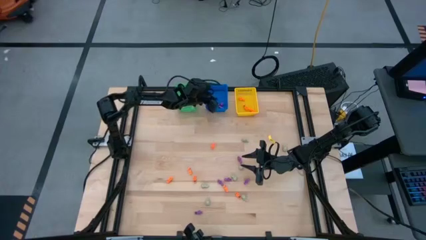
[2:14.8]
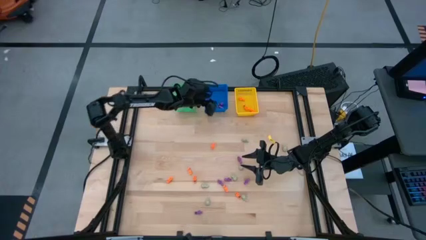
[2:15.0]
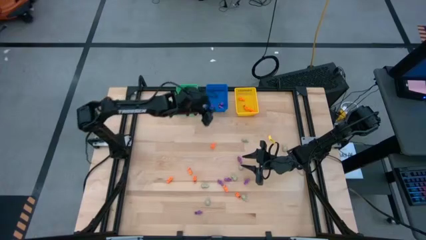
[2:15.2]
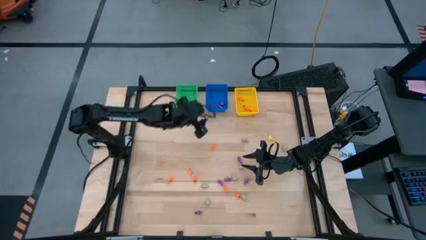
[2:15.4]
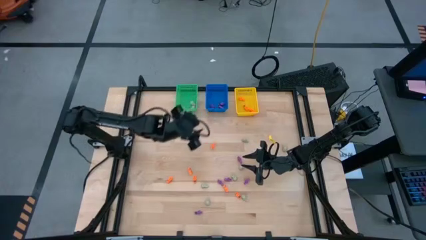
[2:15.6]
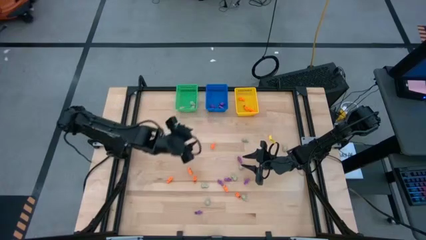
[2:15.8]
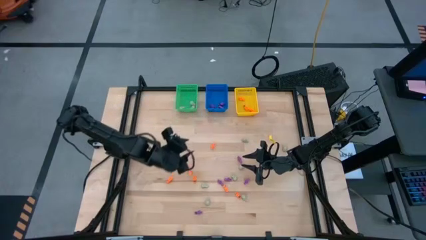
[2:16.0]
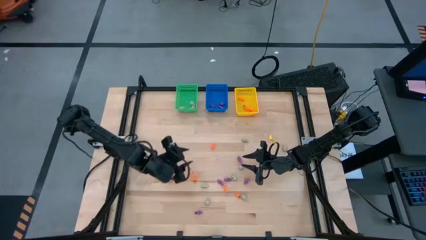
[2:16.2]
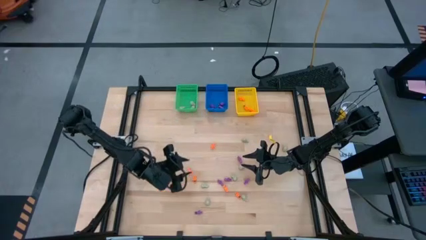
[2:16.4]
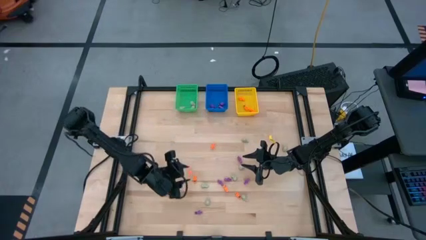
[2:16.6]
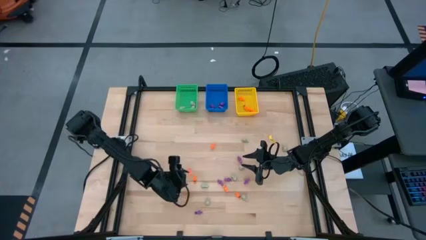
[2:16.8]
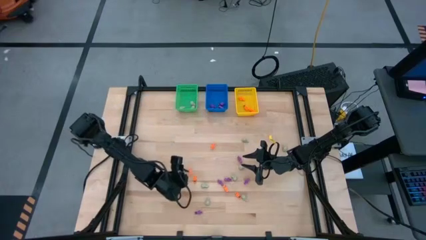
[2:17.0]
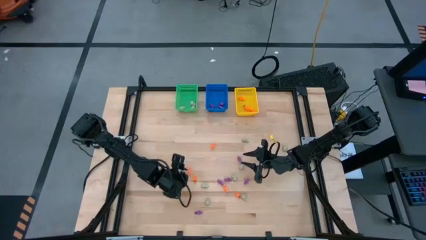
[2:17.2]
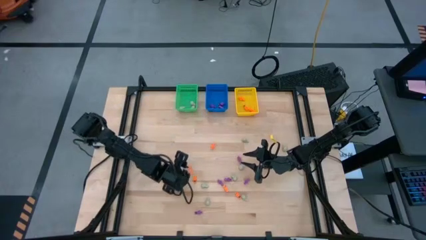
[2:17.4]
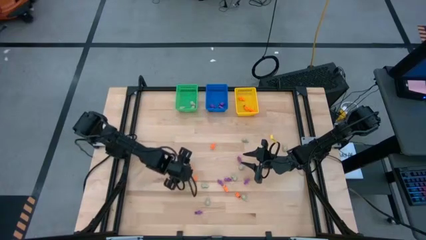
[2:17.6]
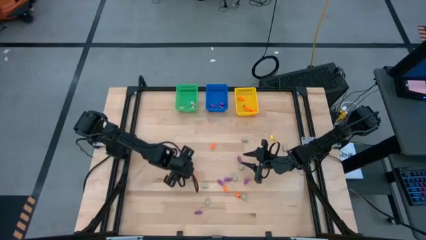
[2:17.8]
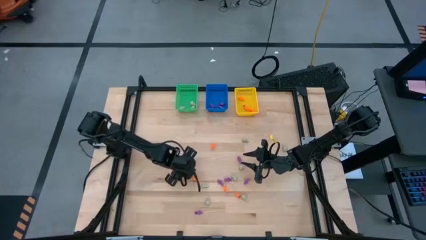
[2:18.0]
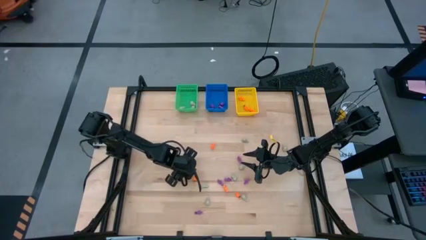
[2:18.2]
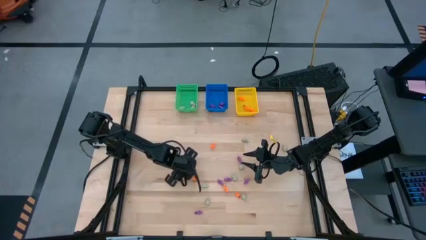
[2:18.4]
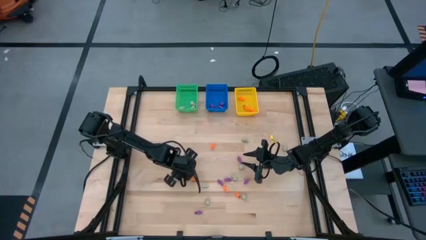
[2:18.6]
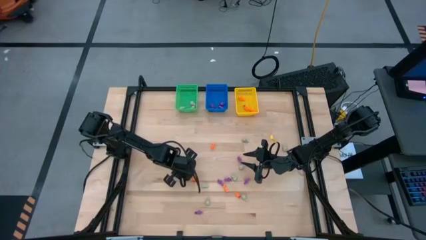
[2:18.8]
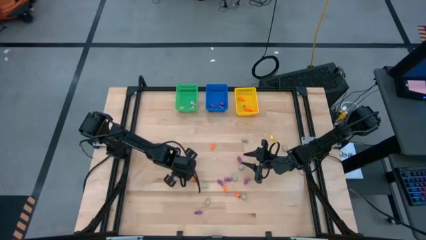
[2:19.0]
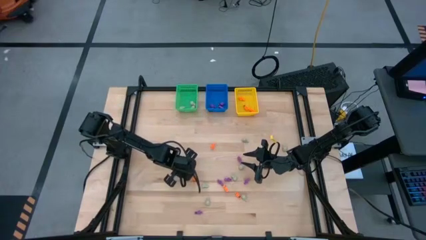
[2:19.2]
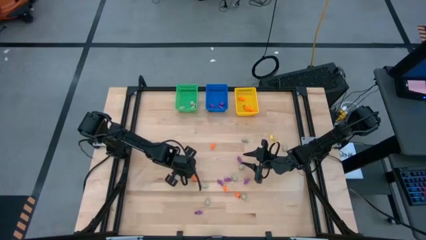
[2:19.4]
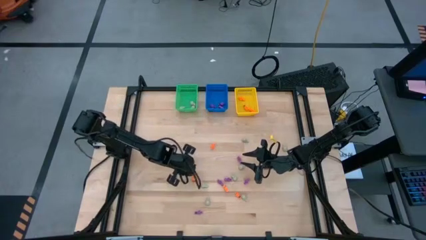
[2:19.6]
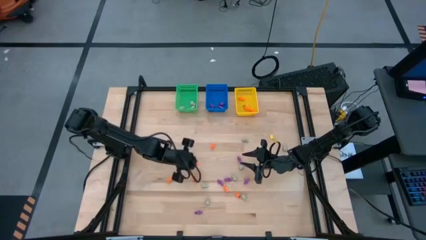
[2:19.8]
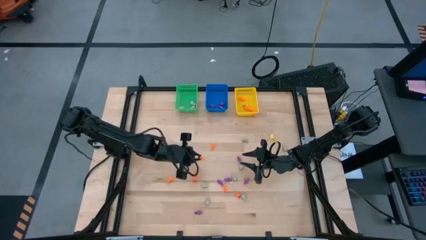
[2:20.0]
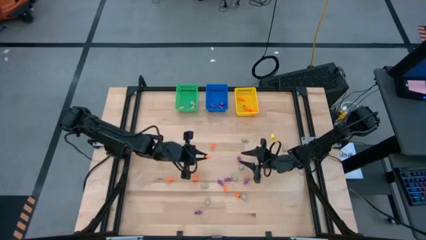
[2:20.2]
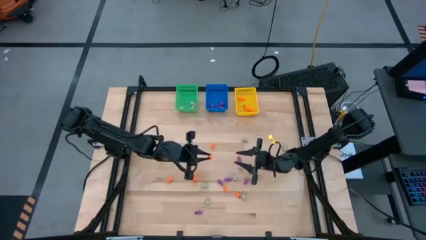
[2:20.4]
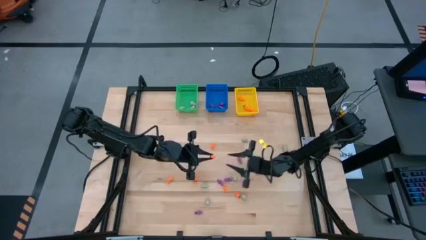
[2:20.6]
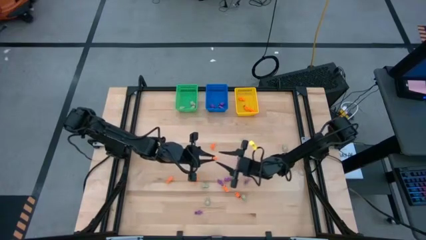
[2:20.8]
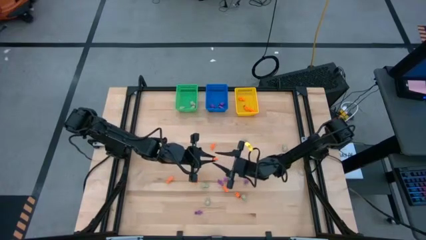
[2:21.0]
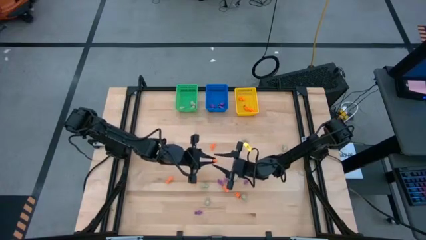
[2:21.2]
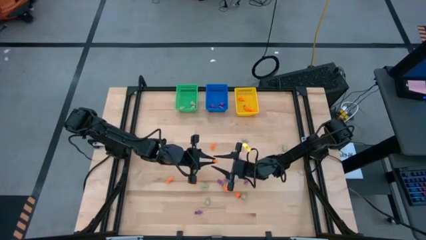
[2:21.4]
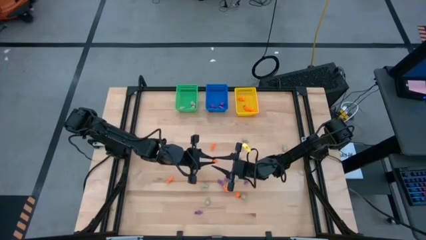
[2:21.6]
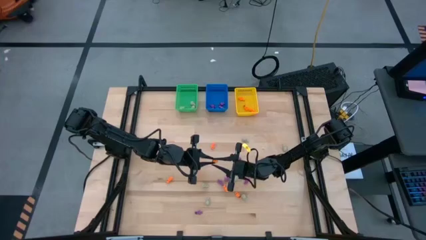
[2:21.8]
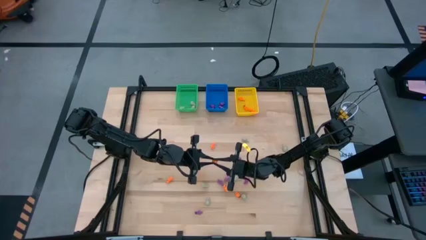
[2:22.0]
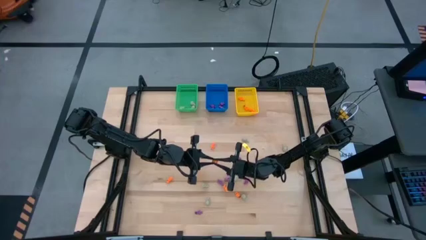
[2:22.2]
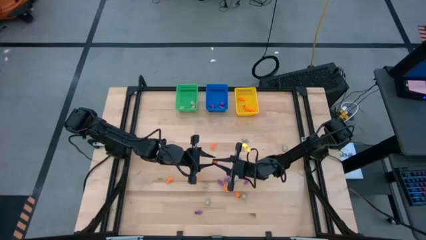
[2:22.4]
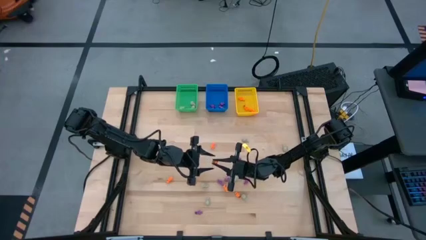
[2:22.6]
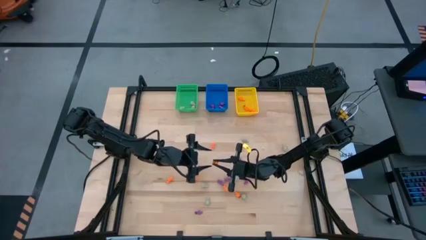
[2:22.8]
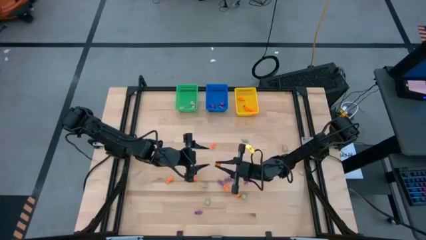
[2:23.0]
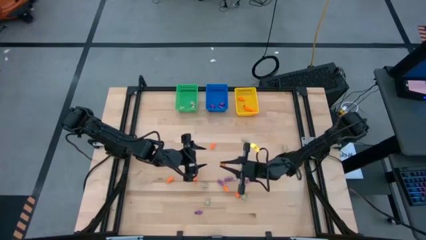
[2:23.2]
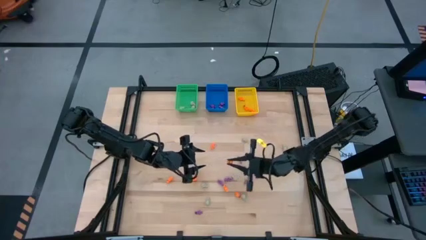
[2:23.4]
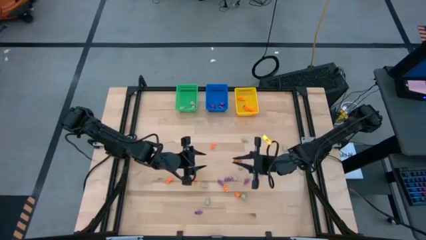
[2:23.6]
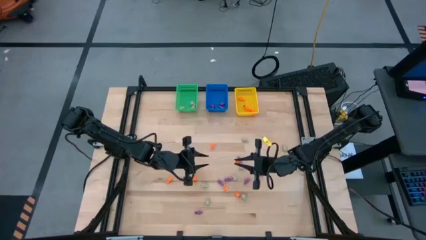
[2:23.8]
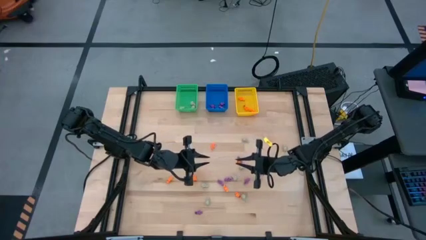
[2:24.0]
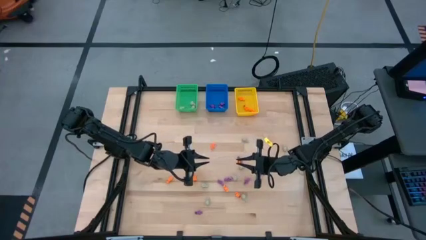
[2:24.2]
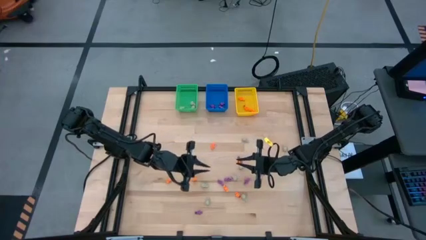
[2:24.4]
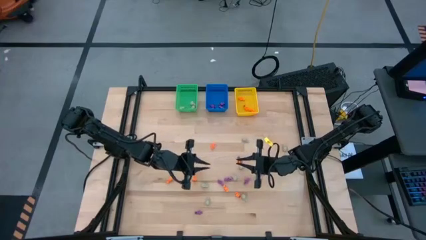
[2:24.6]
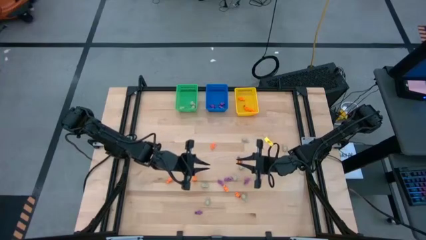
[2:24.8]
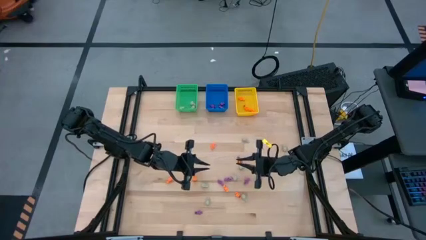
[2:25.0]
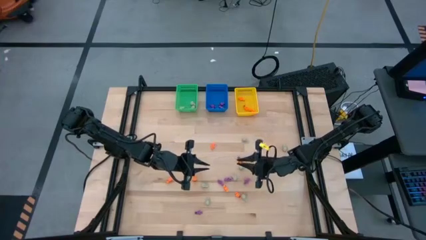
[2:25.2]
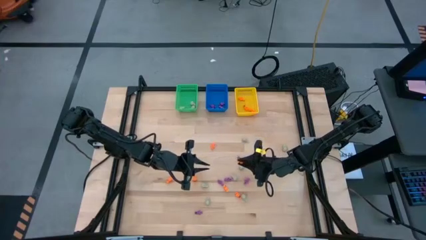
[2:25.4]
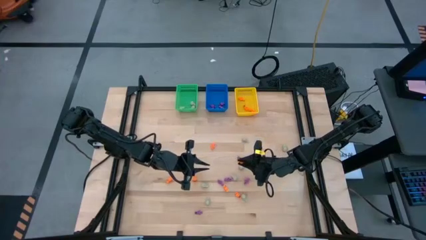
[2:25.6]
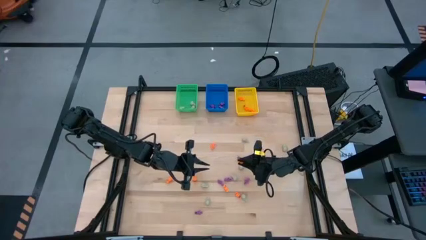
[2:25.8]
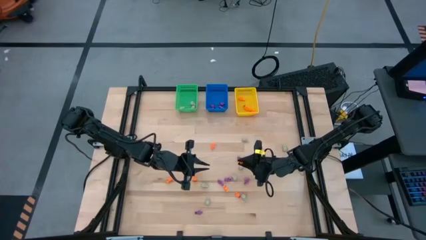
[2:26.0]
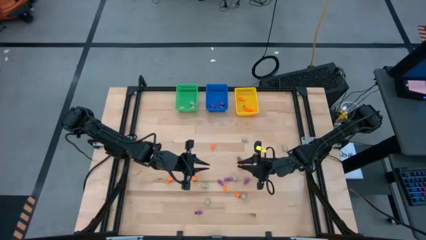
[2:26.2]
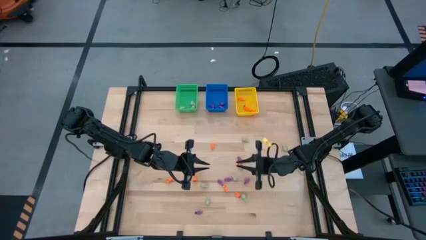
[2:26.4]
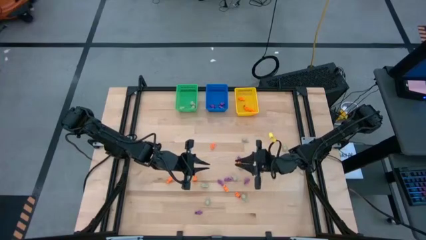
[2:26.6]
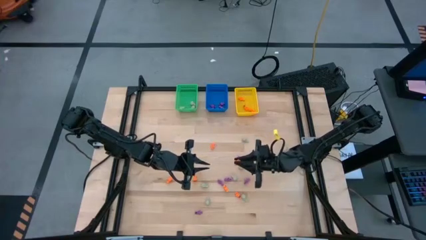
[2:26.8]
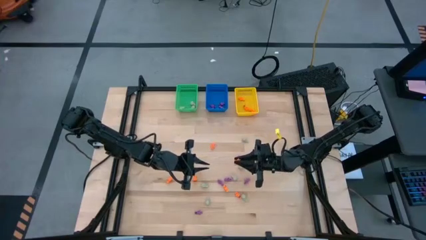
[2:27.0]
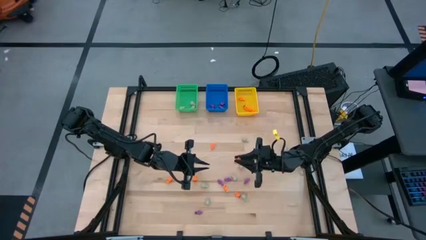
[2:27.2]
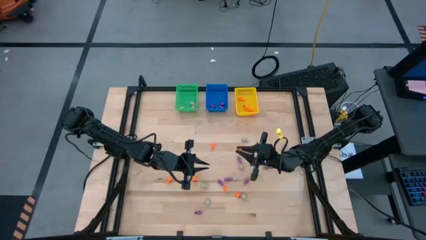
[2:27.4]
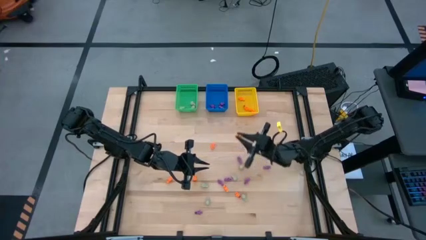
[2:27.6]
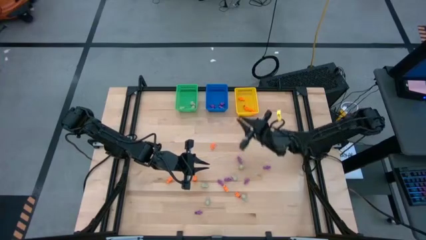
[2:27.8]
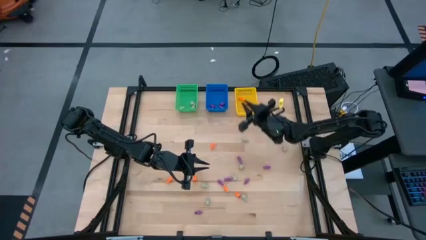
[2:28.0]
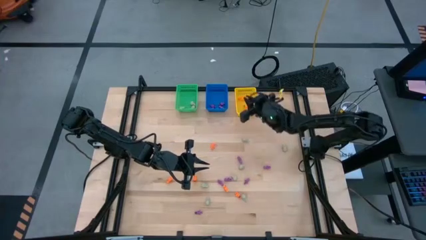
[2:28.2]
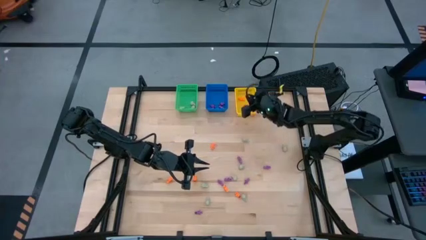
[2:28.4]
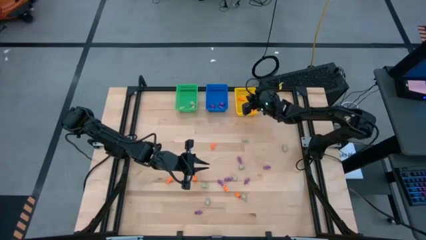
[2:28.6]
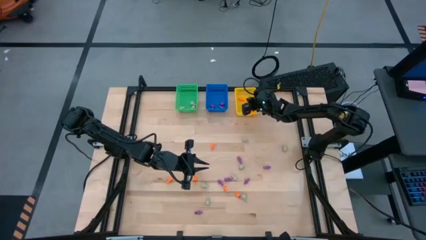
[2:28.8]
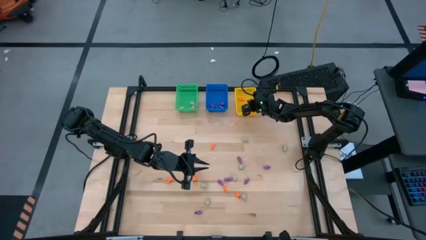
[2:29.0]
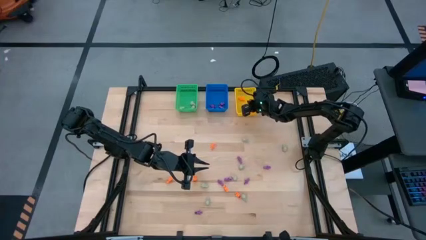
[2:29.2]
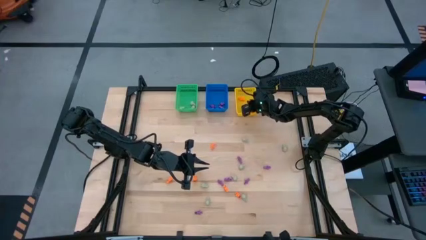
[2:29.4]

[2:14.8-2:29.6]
Task: Sort Halloween decoration
Put the orange skeleton toy into the yellow bin

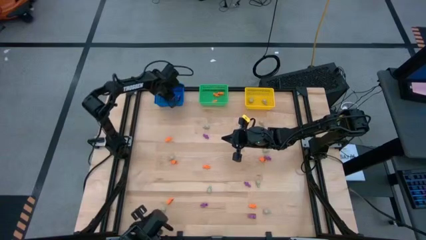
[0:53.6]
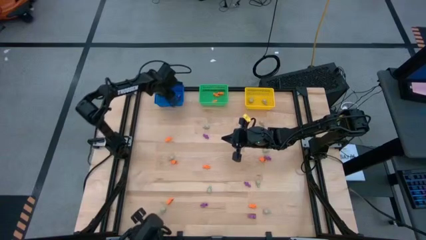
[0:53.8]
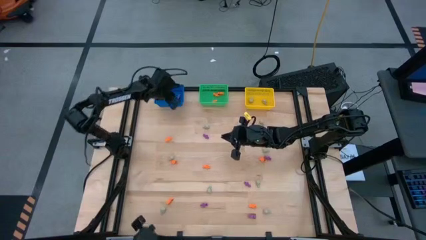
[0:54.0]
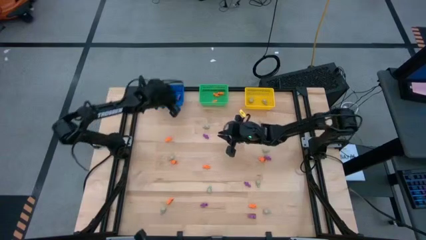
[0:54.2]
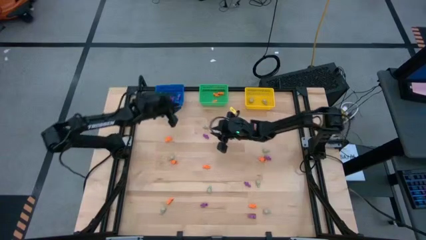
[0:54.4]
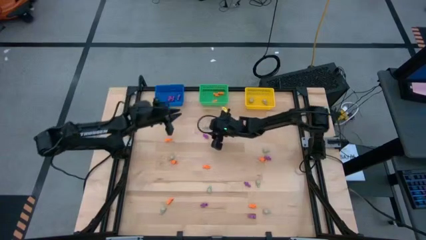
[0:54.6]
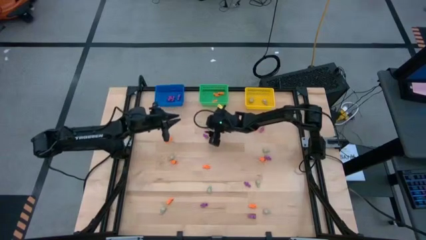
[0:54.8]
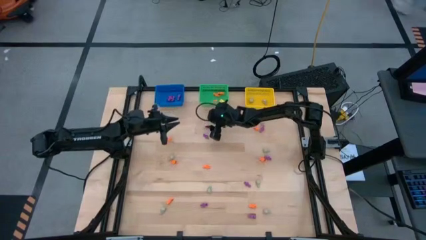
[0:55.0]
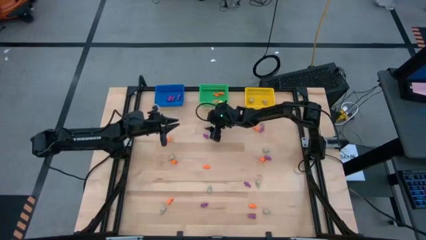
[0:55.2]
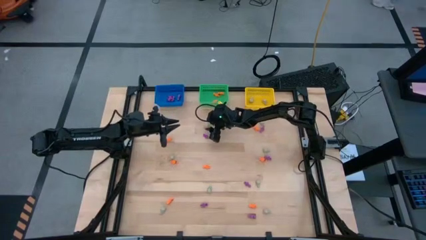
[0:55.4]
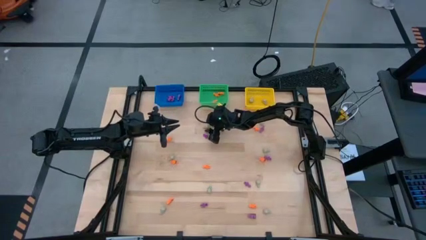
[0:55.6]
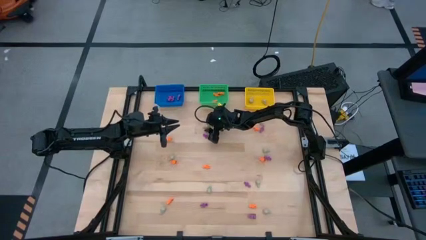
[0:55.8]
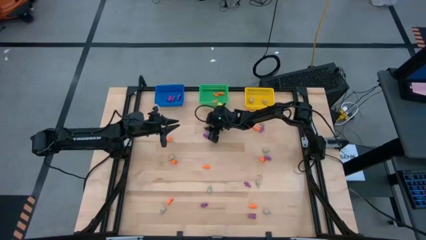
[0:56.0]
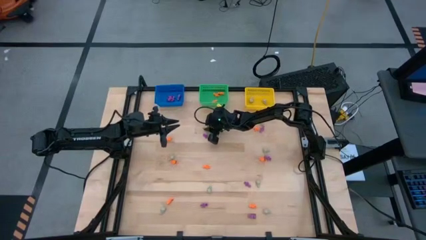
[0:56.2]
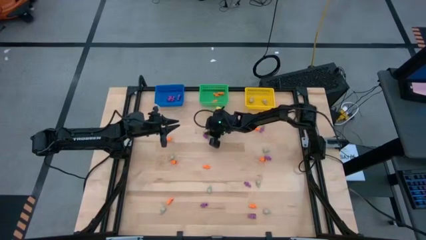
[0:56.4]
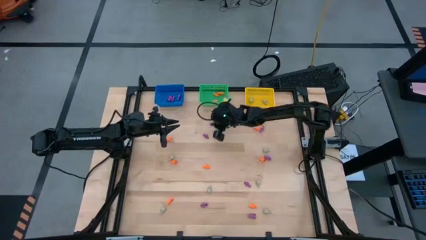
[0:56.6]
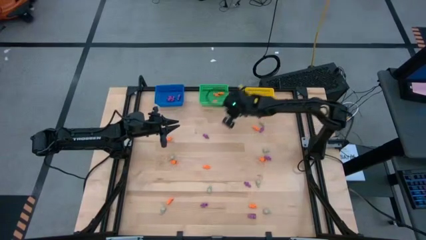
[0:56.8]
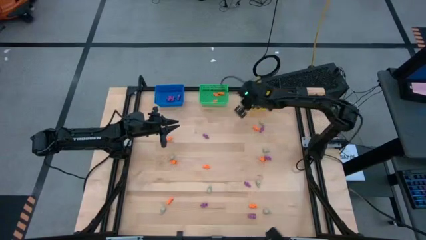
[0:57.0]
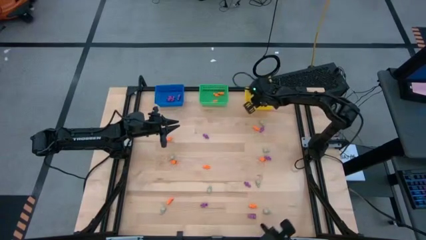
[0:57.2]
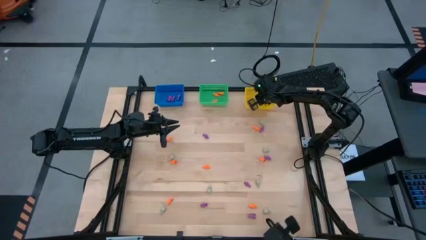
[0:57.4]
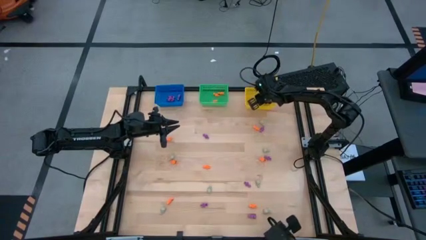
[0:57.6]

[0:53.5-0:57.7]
Task: Sort Halloween decoration
Put the grey skull toy into the yellow basket
